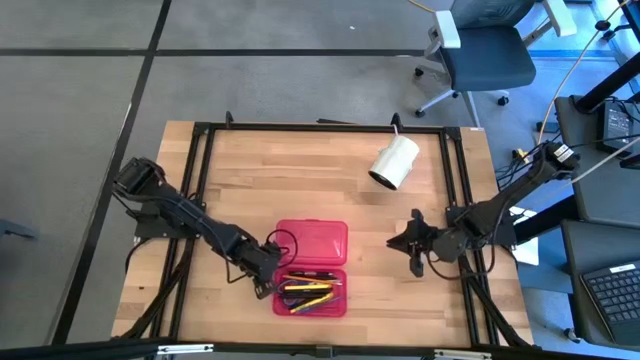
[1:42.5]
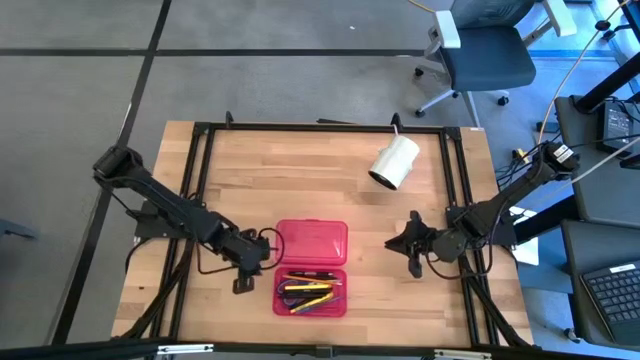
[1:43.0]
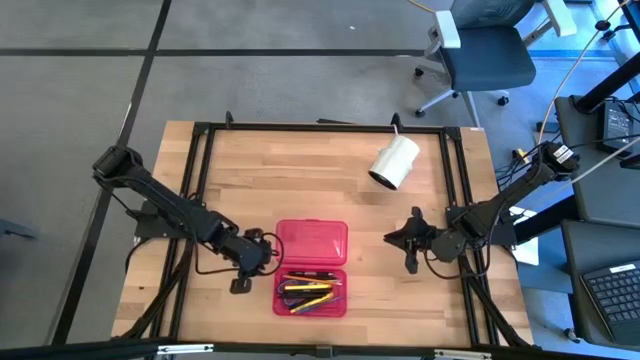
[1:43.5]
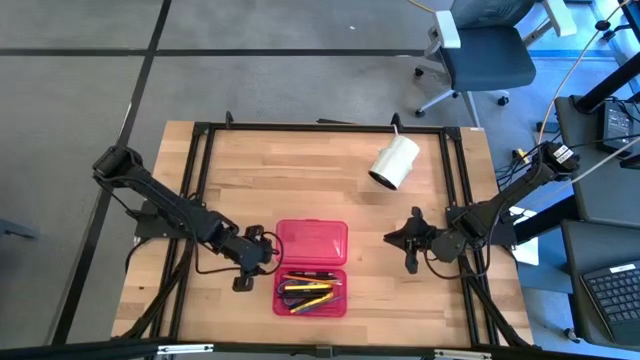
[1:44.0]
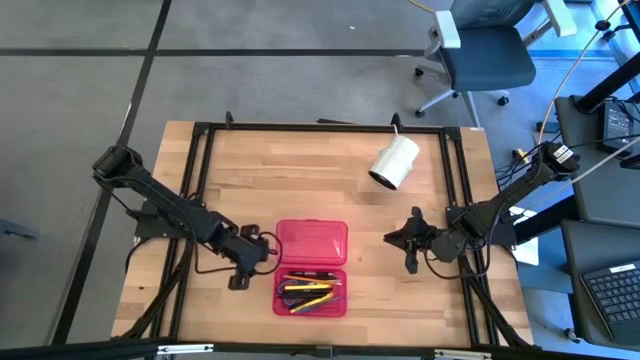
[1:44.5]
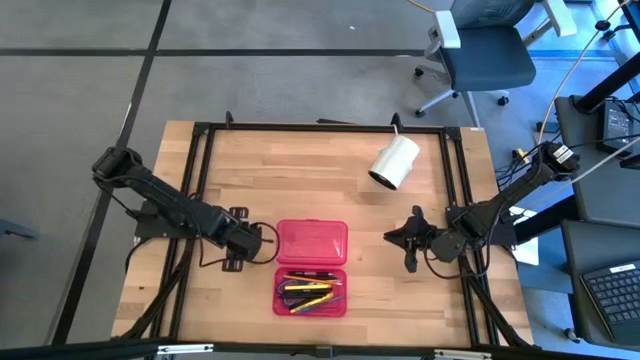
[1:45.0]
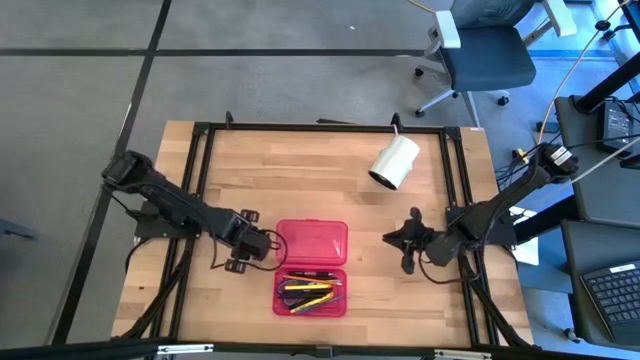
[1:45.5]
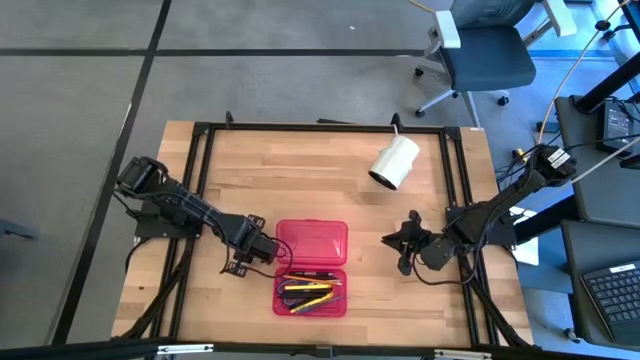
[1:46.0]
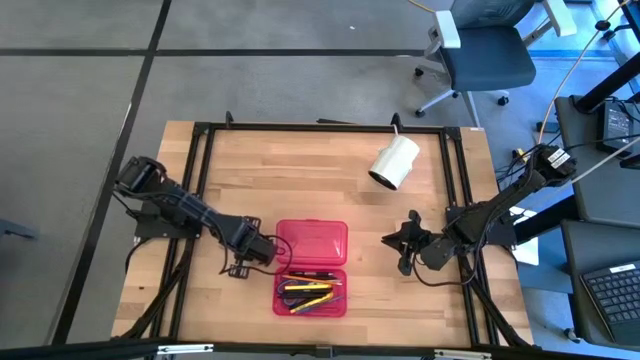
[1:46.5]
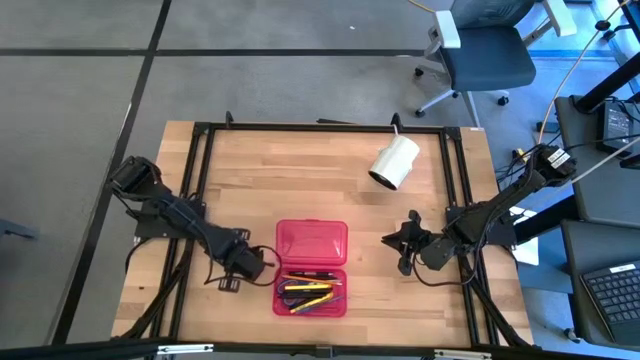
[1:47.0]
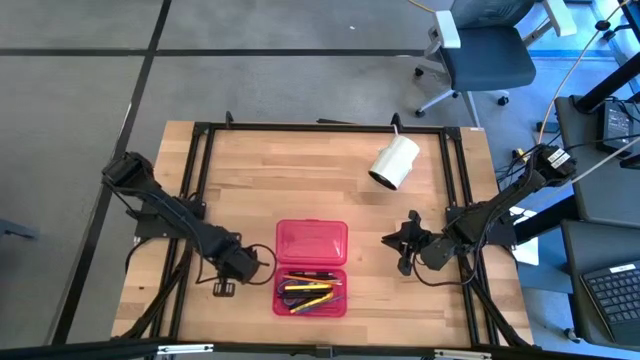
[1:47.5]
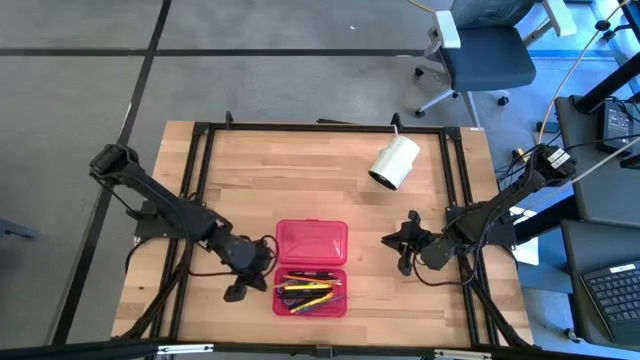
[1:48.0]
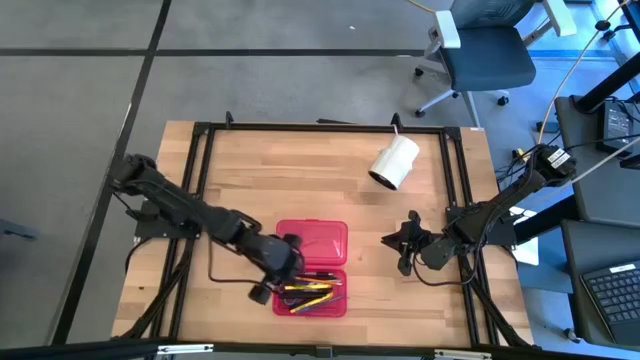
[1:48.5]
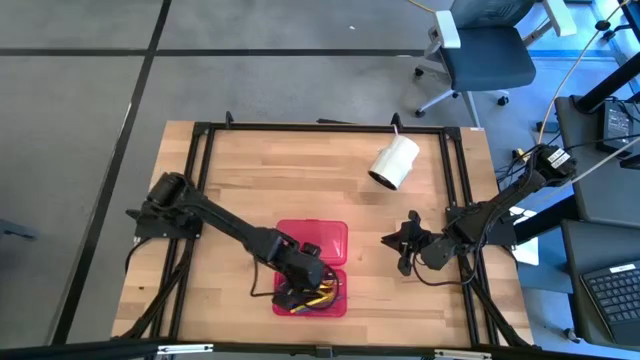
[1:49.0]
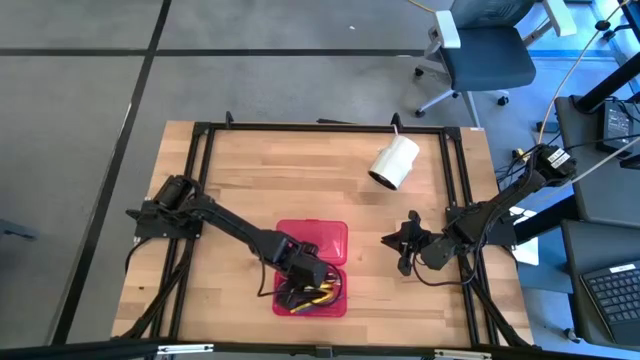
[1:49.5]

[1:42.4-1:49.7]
Task: Pick & place school supplies into a supply box
Put the yellow pencil into the red supply box

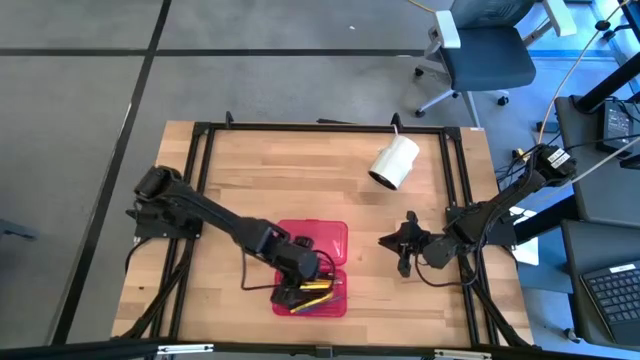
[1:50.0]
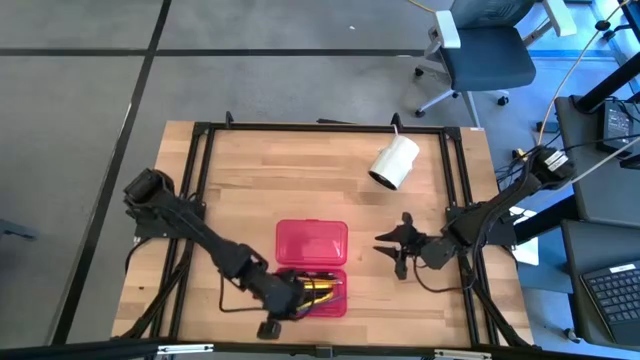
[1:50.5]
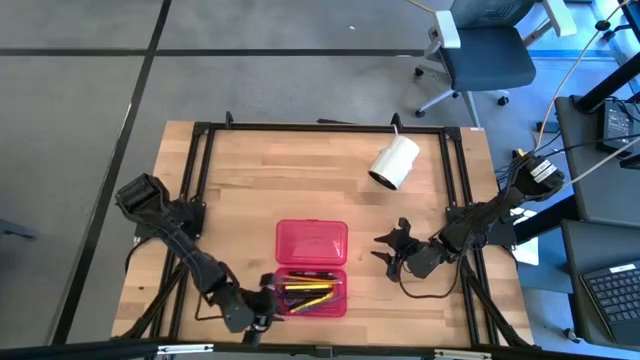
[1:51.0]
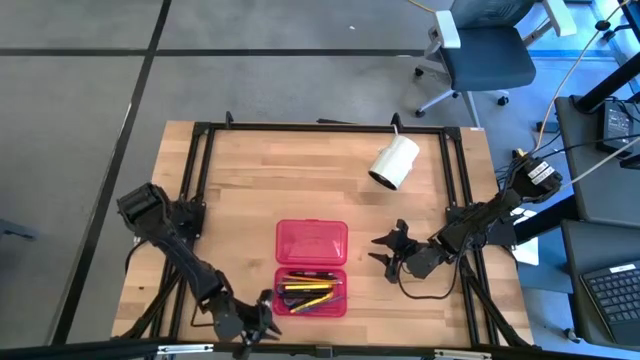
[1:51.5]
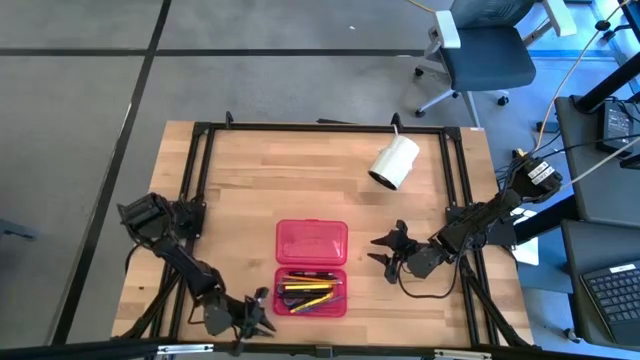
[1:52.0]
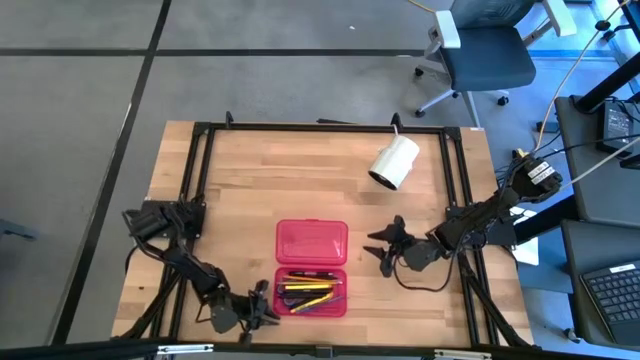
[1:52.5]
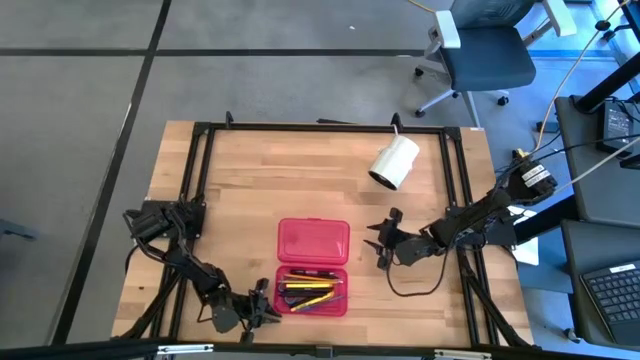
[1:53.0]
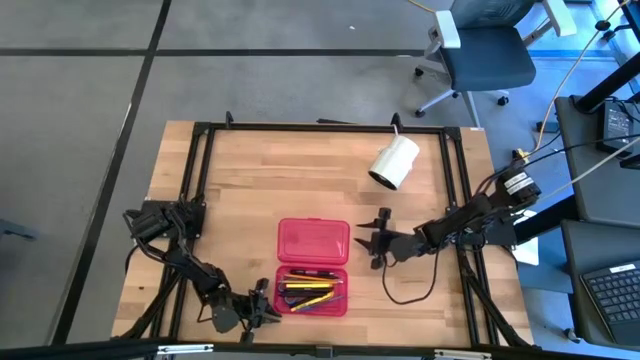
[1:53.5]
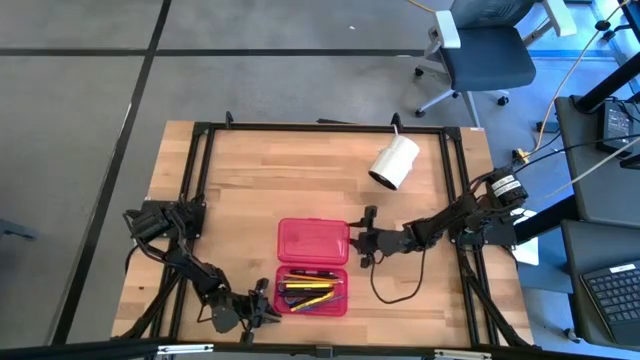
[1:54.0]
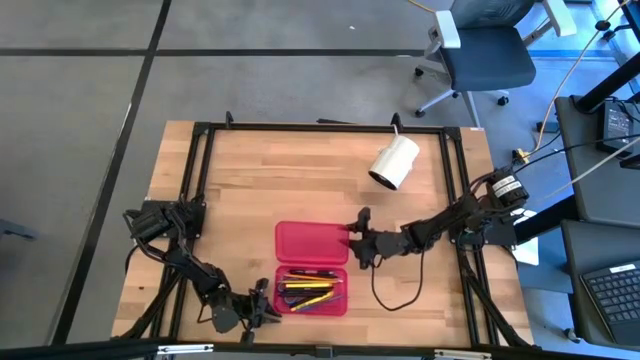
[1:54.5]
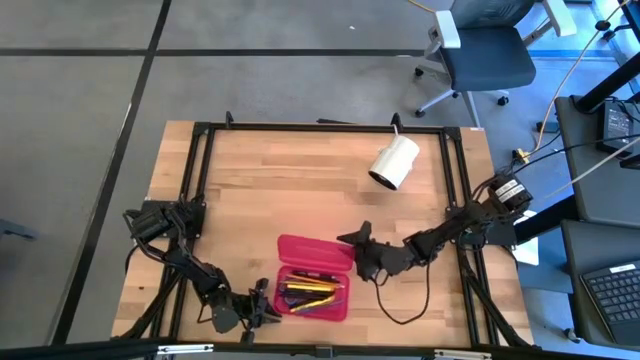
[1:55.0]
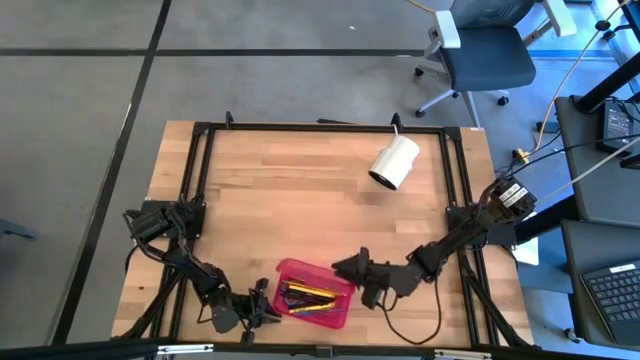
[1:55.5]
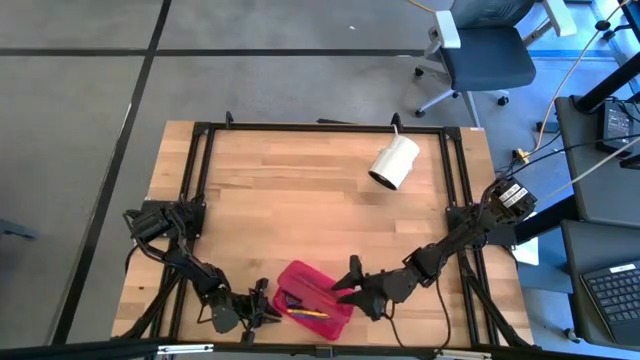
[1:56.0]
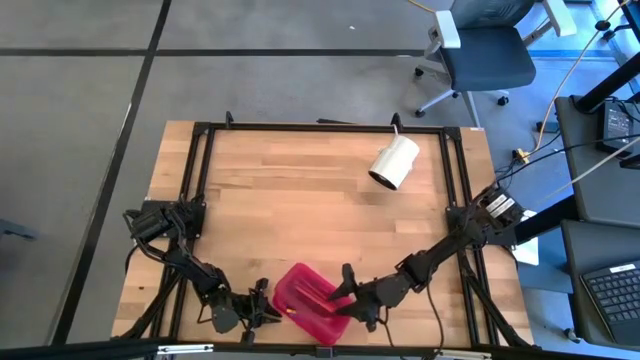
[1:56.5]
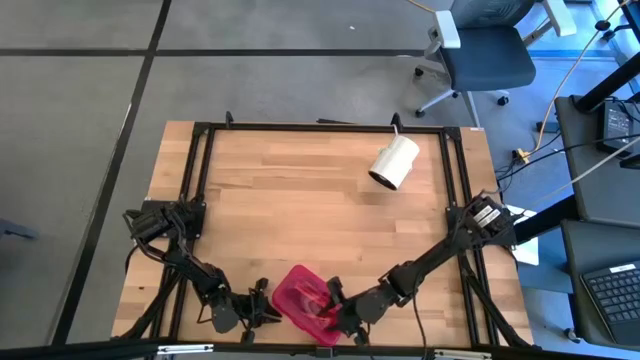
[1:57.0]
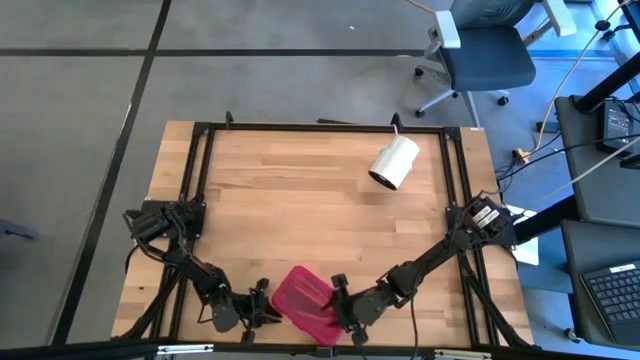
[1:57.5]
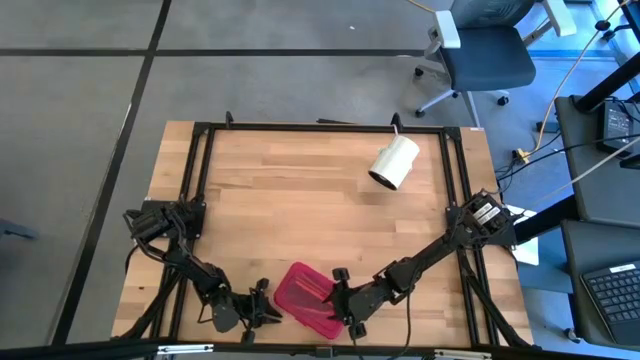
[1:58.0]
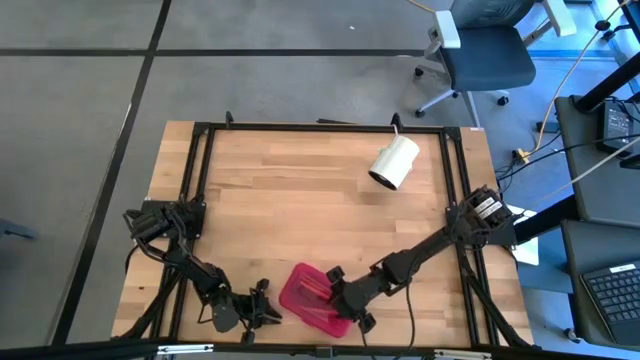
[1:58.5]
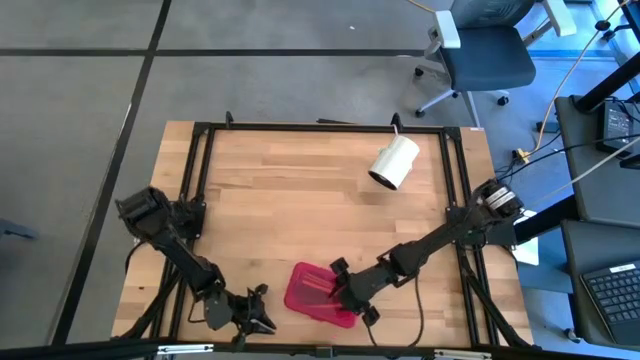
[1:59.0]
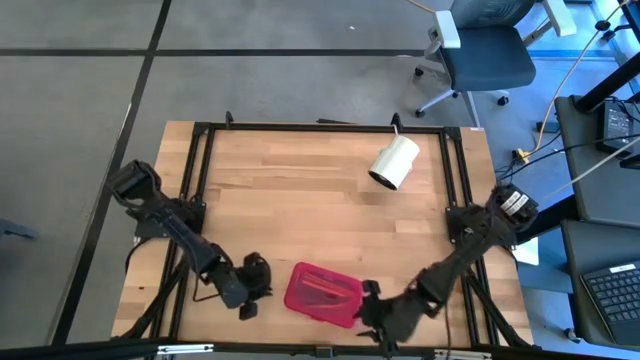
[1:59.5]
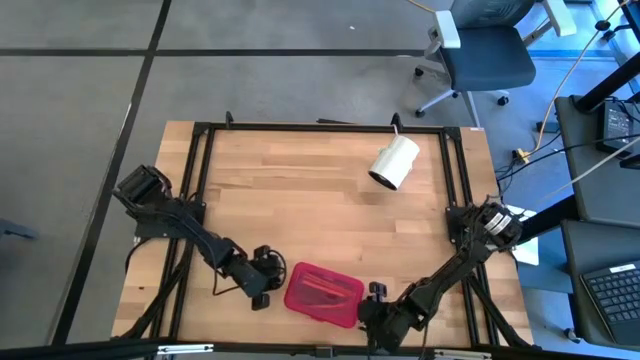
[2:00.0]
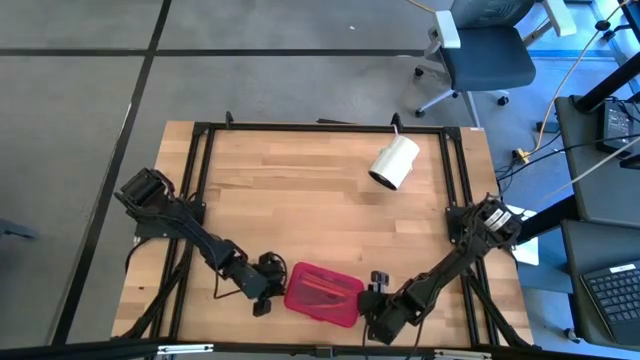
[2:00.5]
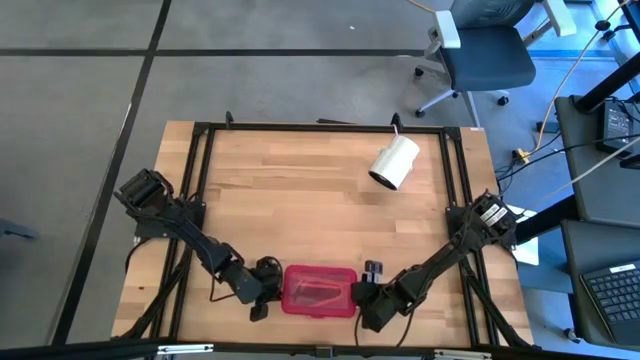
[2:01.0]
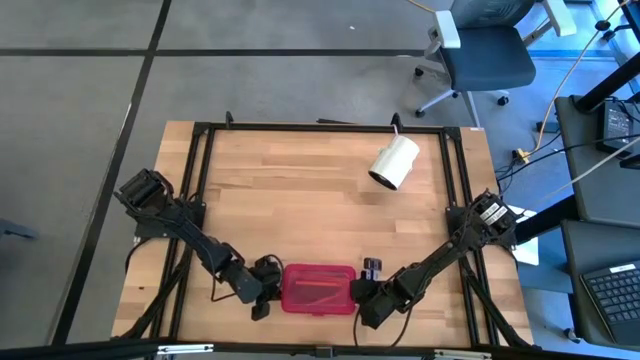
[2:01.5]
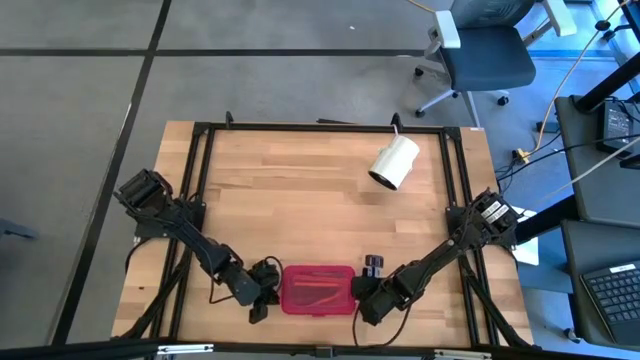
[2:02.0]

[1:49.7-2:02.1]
Close the red supply box

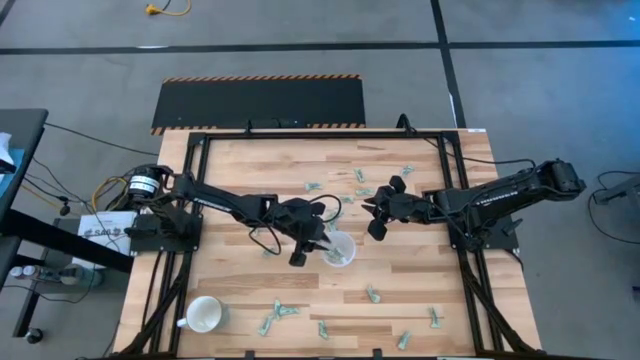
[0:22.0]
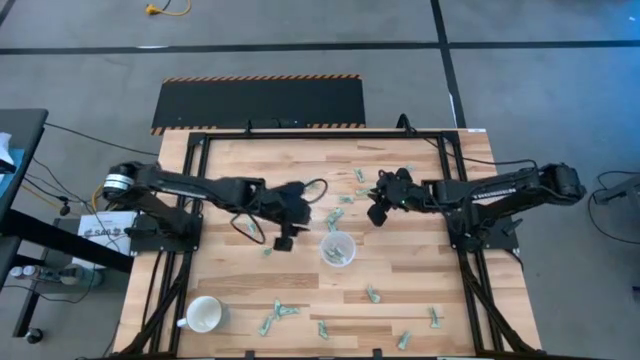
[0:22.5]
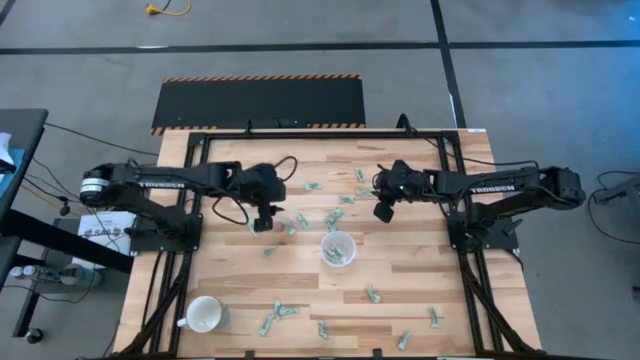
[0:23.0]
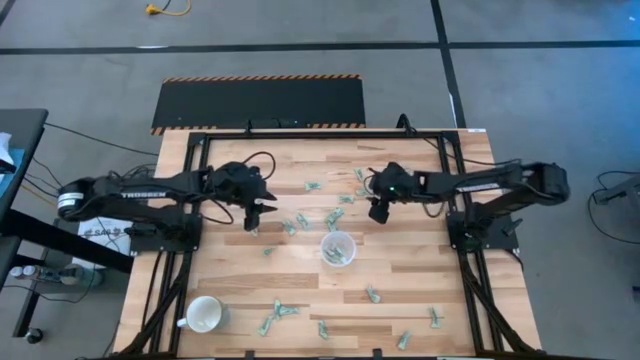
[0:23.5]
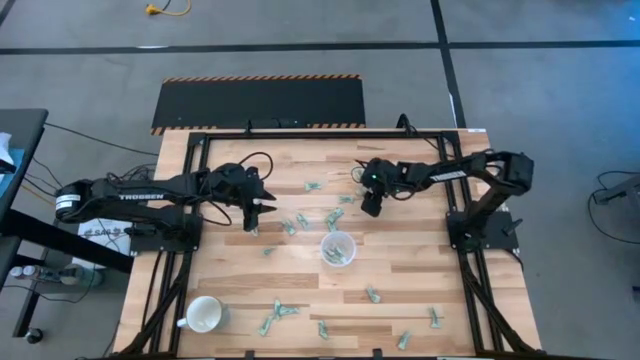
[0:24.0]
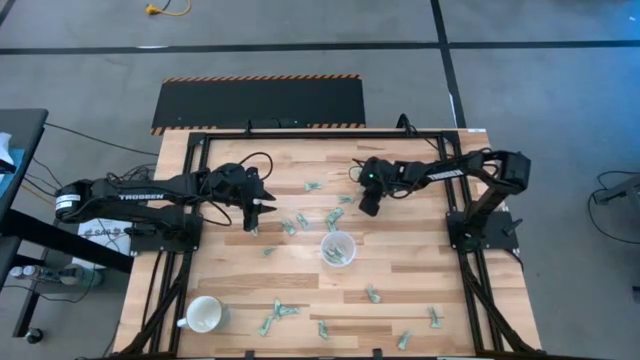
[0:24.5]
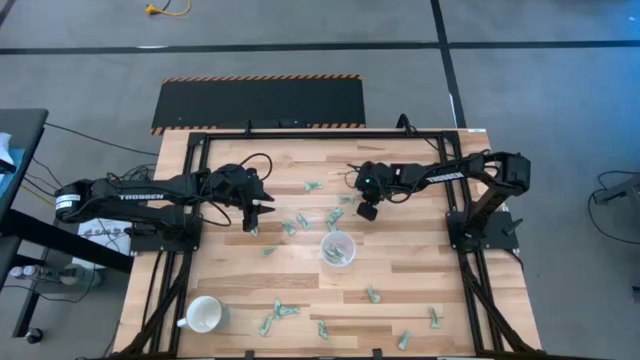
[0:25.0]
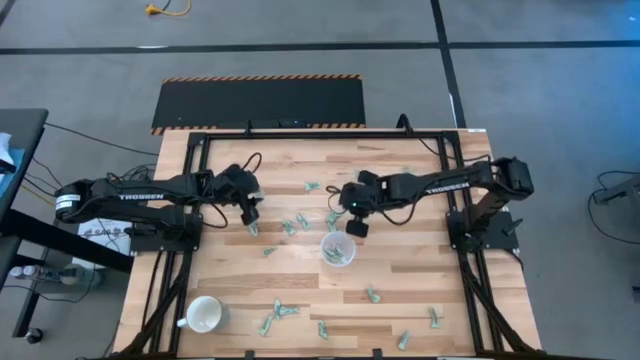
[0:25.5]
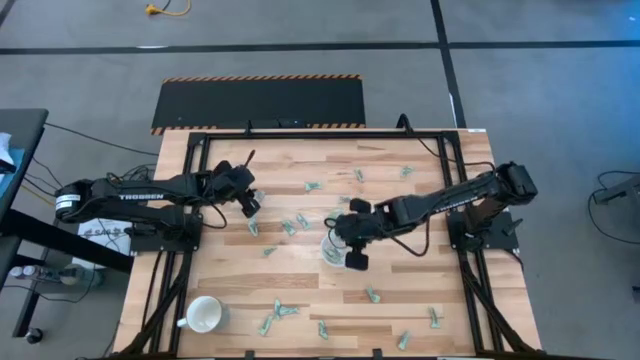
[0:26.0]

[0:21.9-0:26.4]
Task: Pick and place Stevia / Truvia into bins
Put the stevia packet into the transparent container
